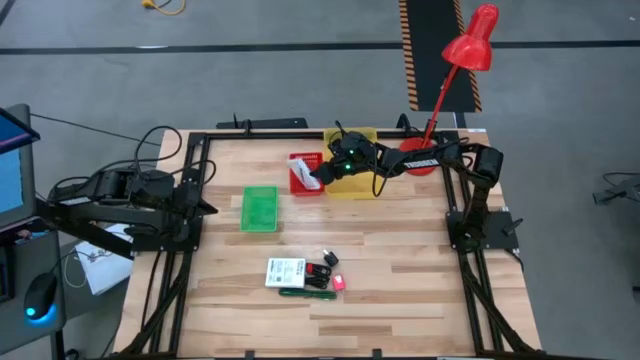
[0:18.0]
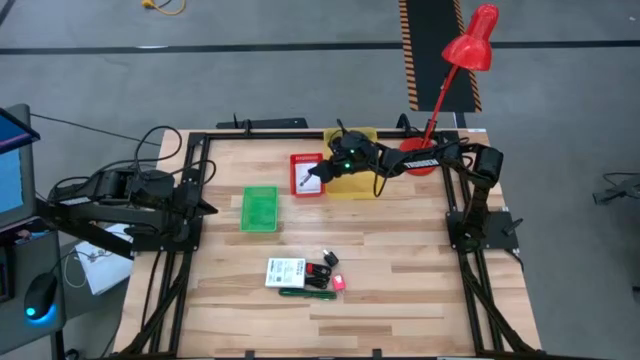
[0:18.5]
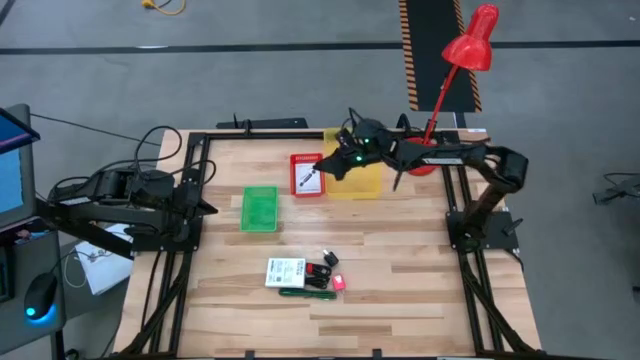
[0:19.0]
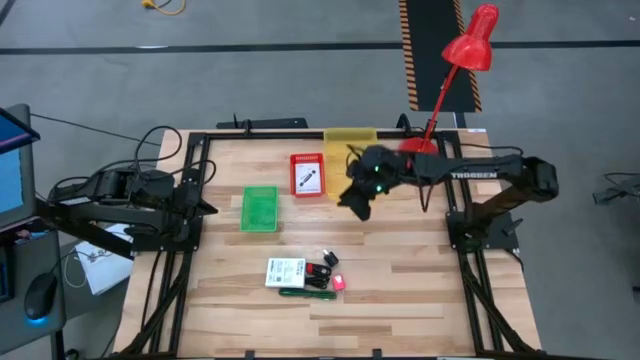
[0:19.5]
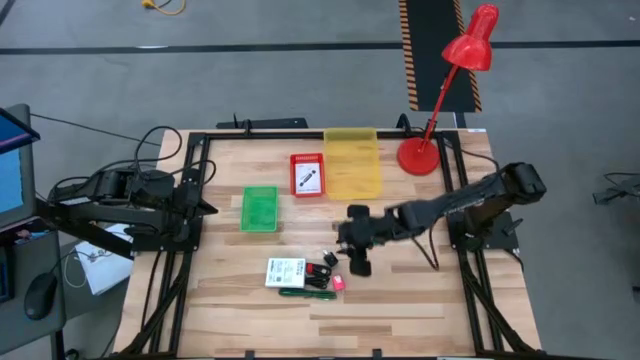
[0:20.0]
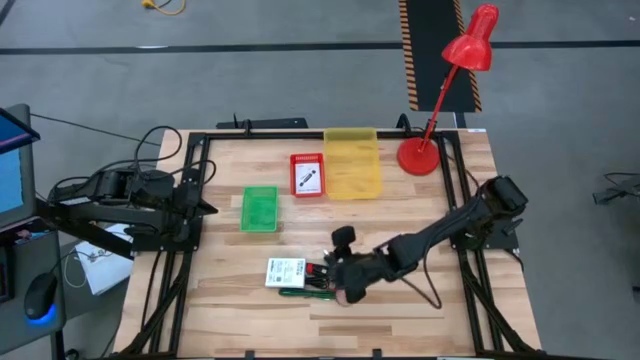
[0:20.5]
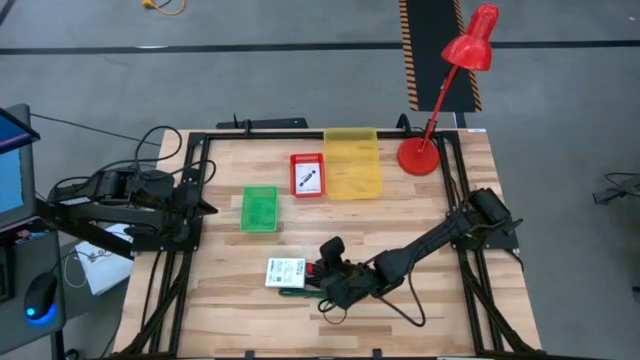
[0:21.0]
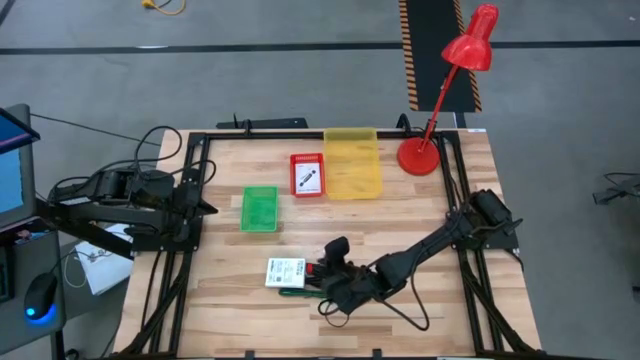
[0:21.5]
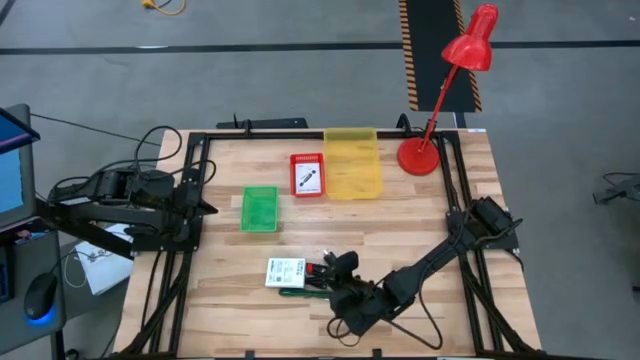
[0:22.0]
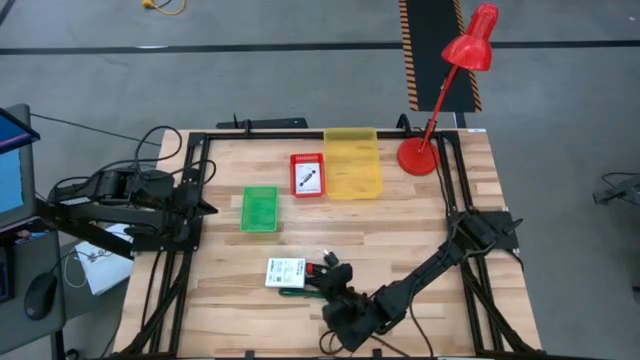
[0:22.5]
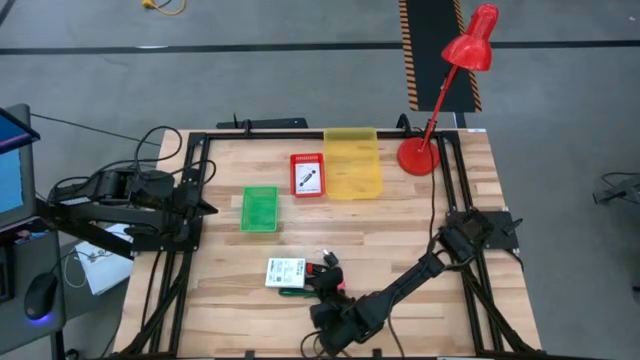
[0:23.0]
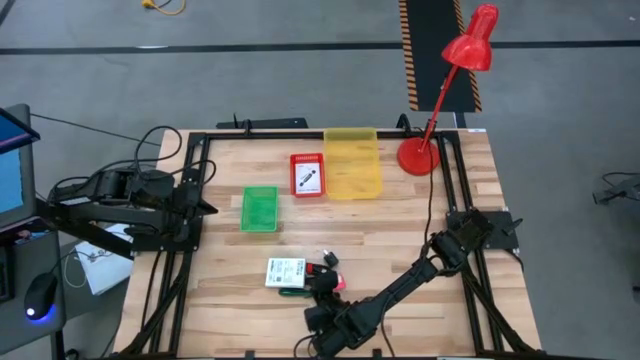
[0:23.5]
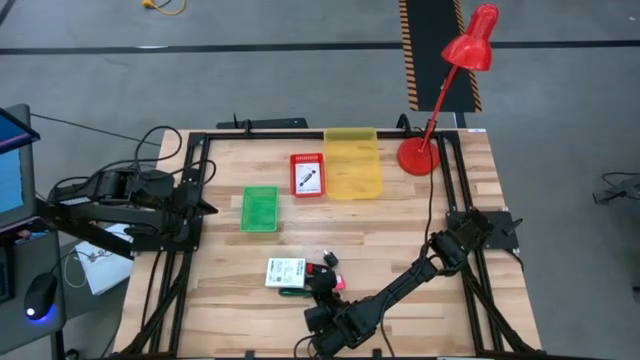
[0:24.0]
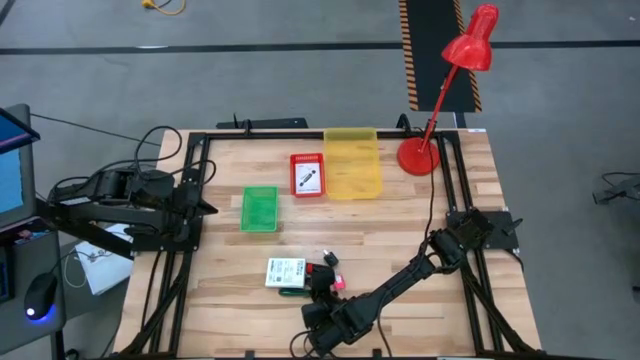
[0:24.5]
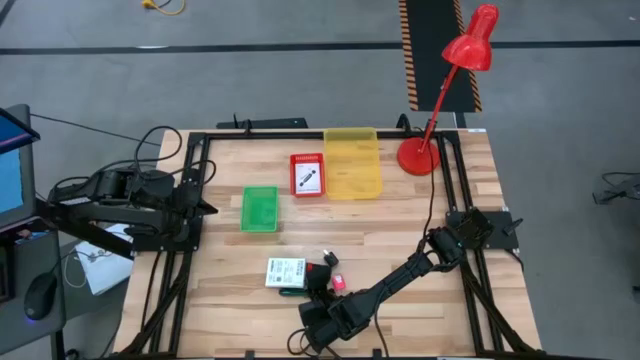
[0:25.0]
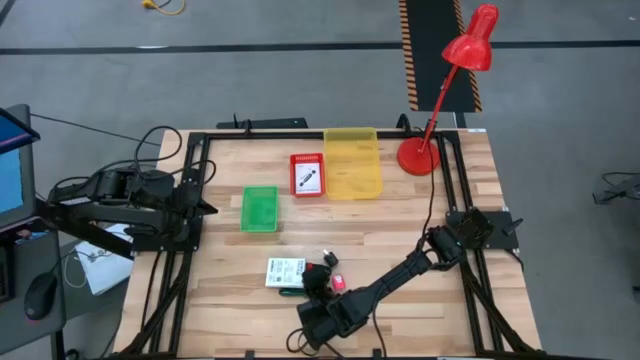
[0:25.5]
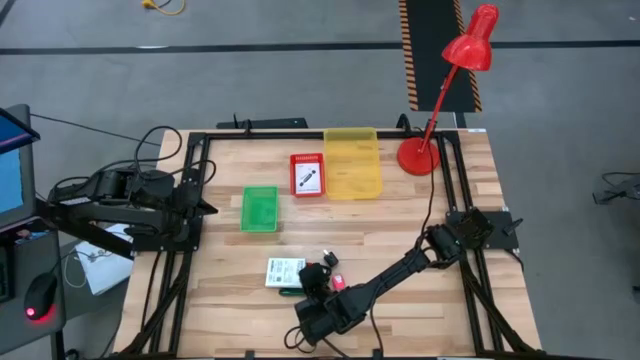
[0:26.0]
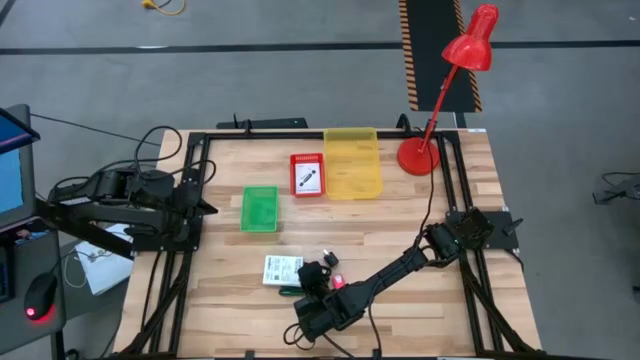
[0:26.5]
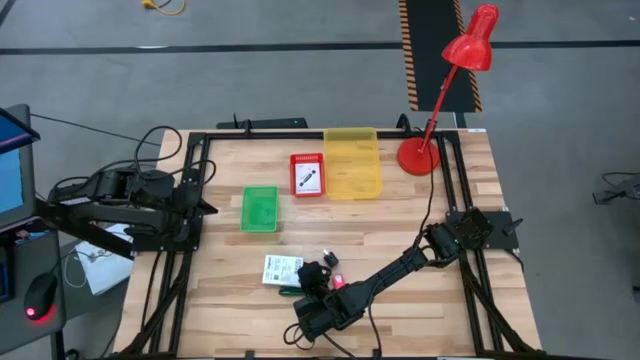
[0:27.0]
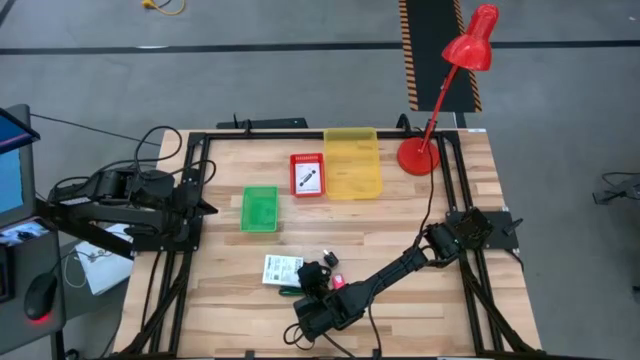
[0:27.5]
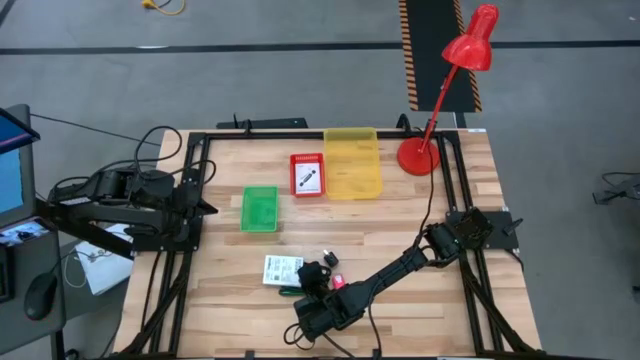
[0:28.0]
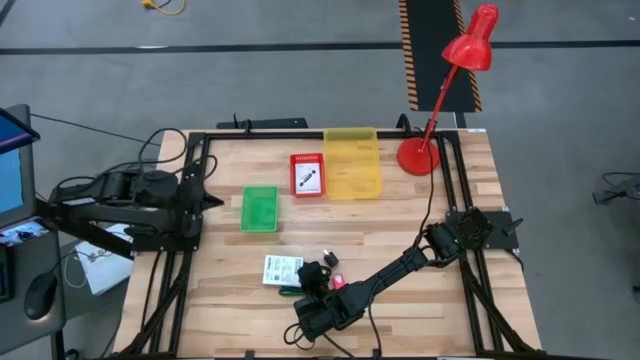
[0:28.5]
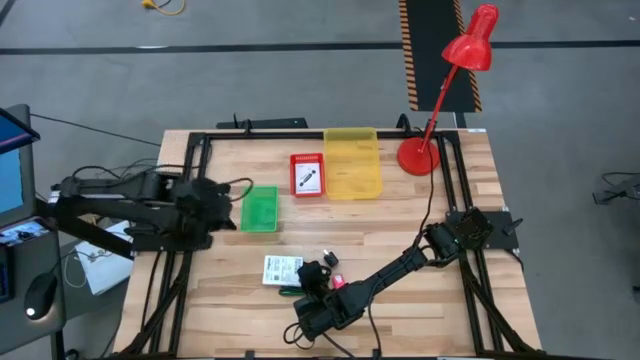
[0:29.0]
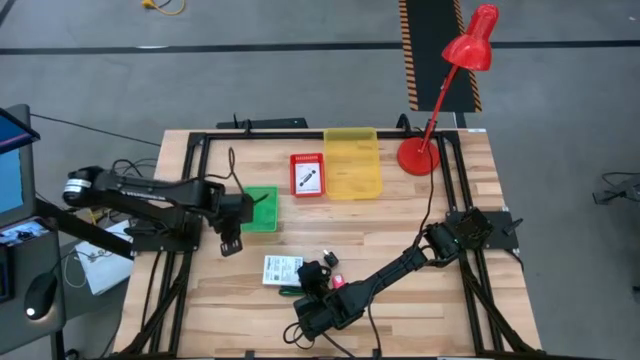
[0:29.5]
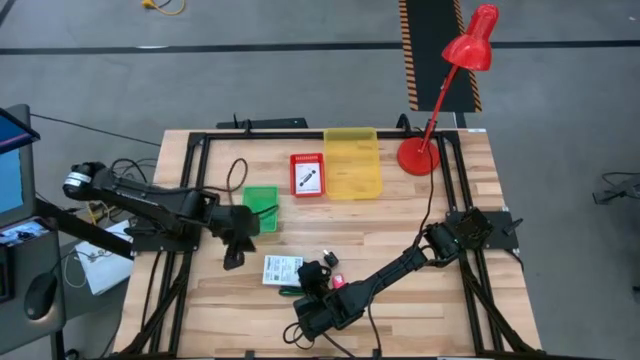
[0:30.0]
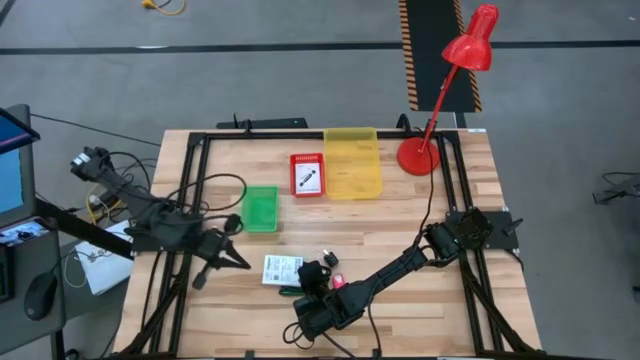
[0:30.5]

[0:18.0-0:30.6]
Task: Pick and place items into bin
Put the card reader box into the red bin

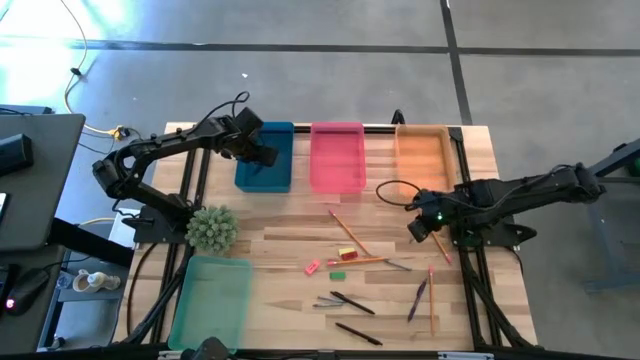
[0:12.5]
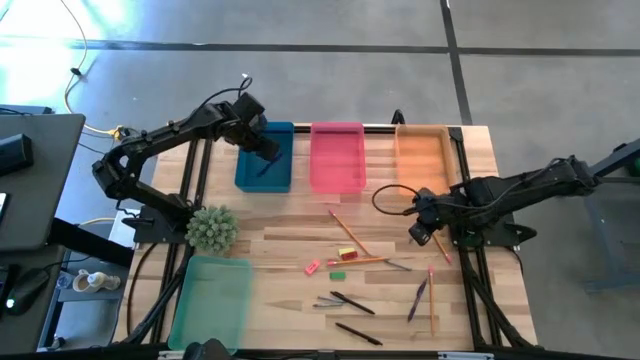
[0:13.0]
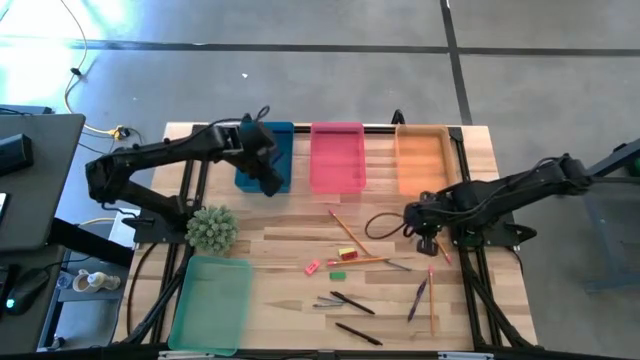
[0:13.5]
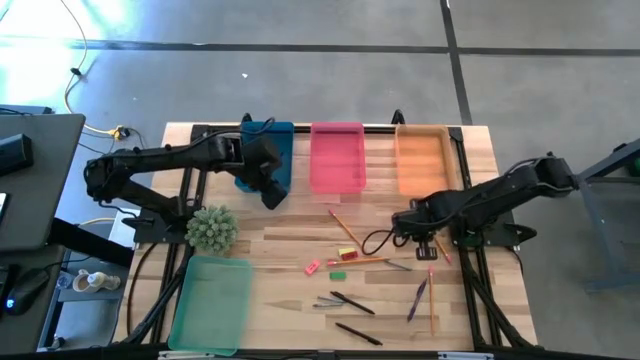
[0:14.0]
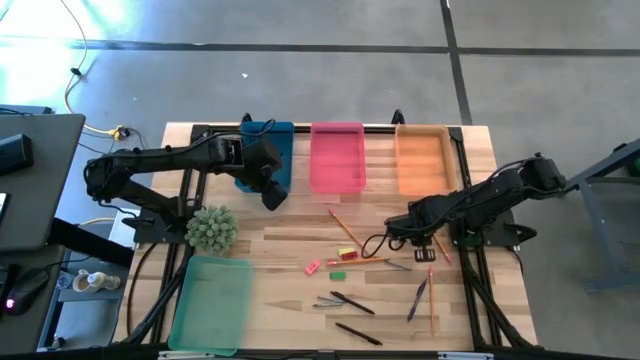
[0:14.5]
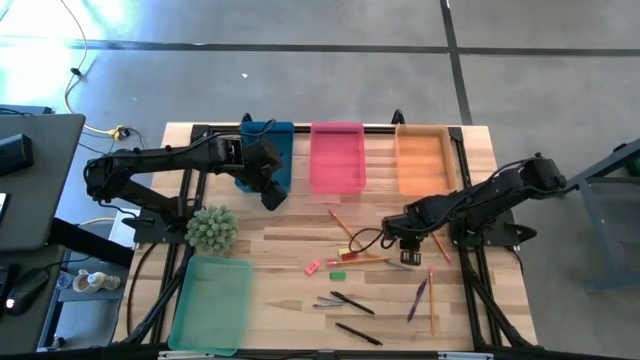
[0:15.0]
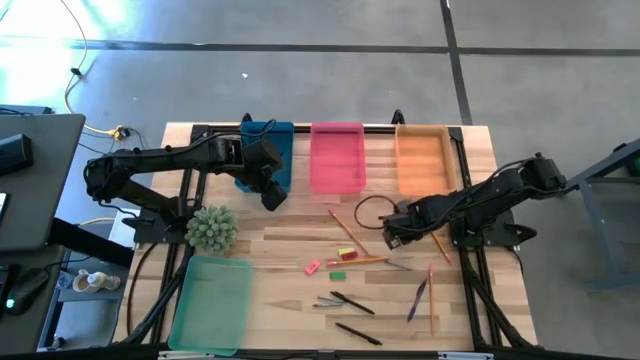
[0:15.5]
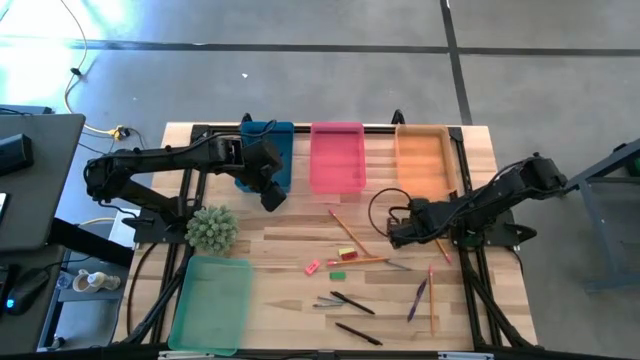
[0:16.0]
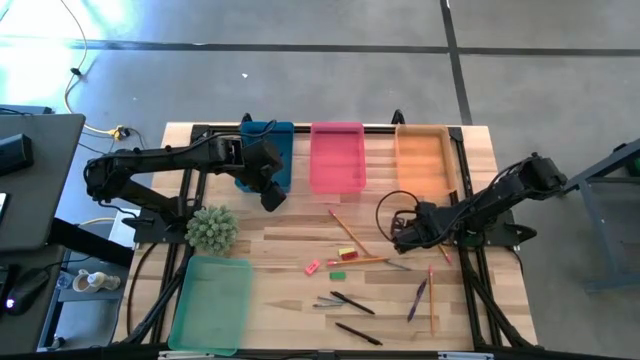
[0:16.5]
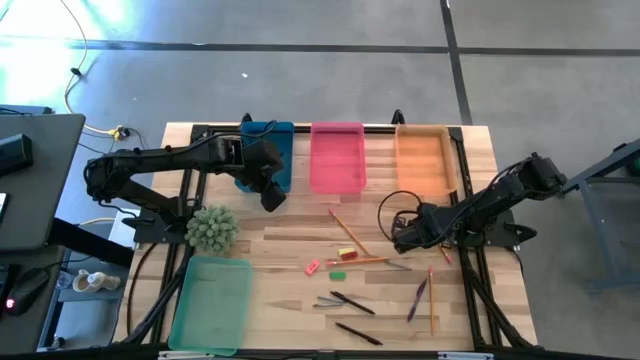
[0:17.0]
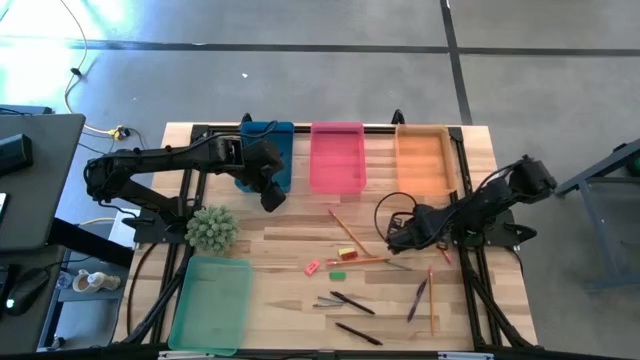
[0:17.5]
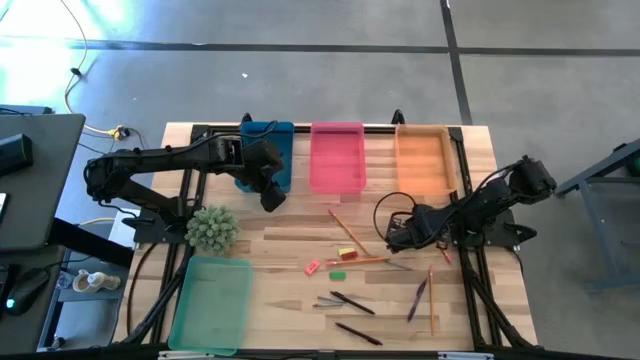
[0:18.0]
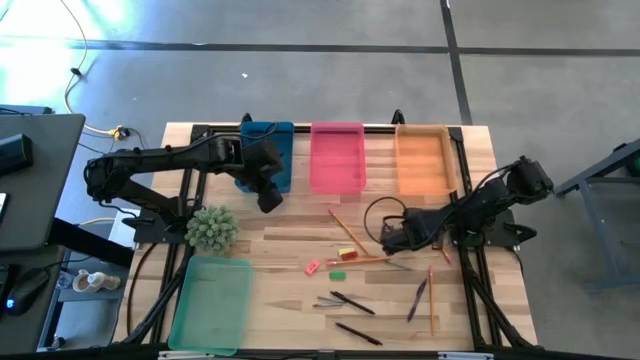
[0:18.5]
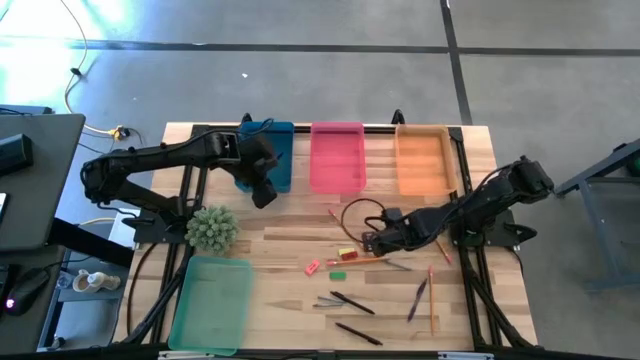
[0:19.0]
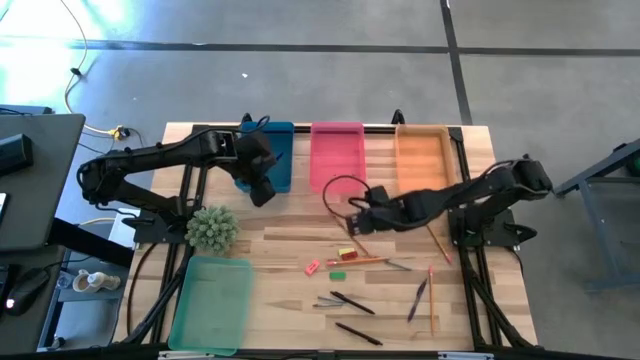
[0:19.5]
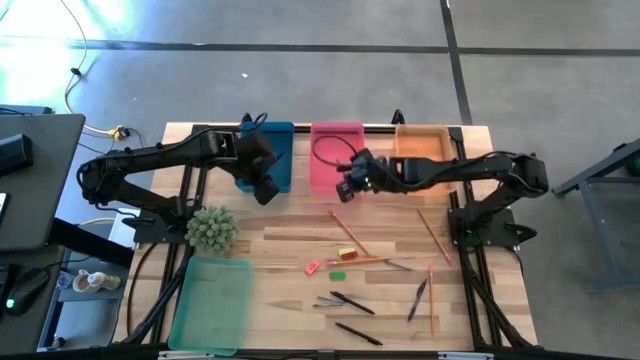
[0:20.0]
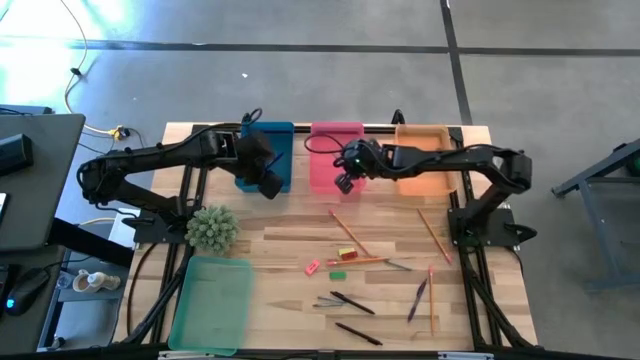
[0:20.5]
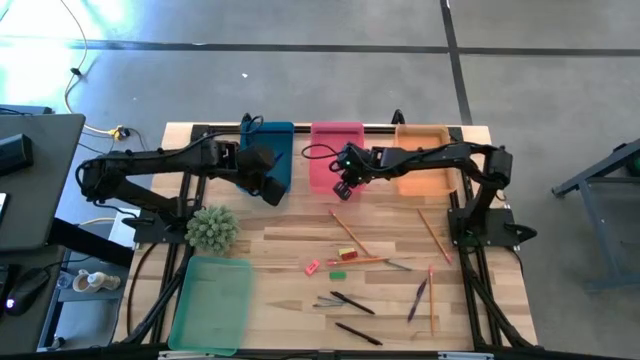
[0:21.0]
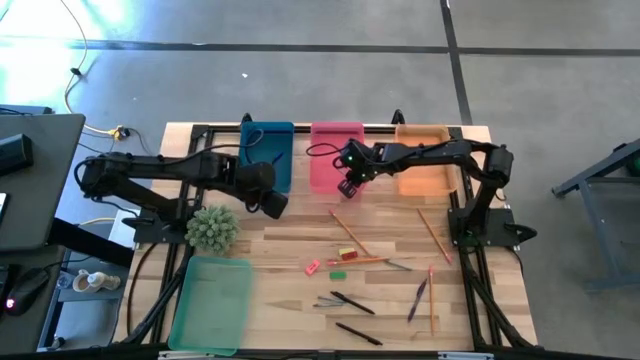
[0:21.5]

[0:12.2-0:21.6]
Task: Sort crayons/erasers/pens/pencils in bins
Put the gray crayon into the pink bin
